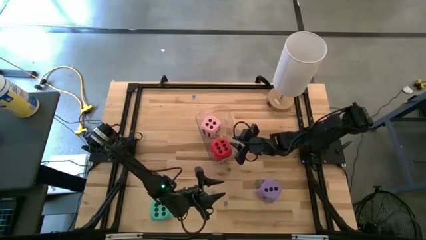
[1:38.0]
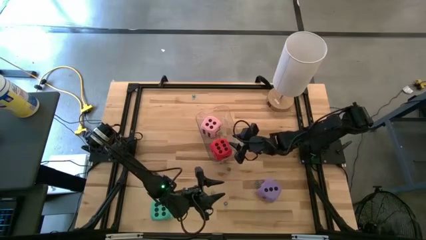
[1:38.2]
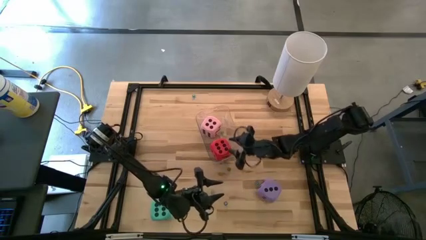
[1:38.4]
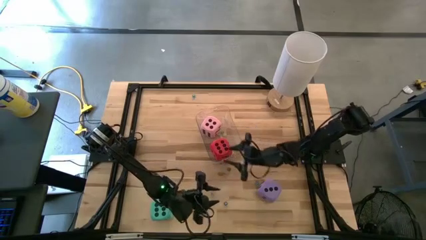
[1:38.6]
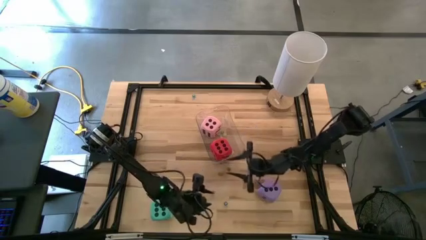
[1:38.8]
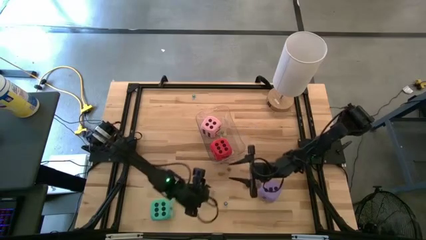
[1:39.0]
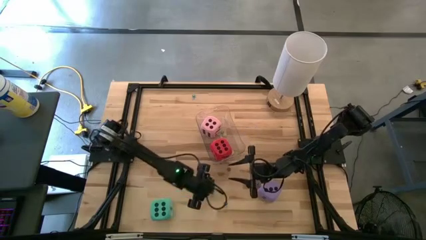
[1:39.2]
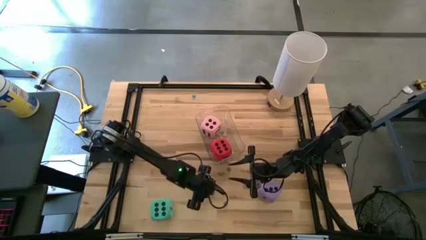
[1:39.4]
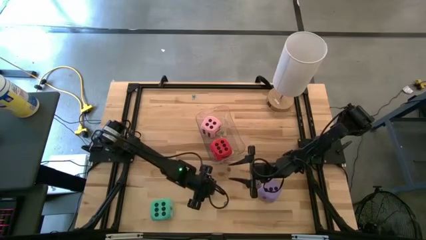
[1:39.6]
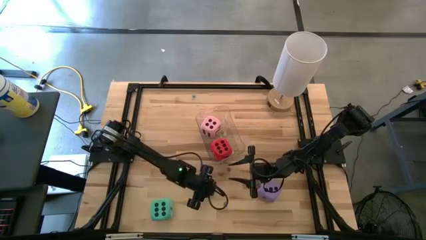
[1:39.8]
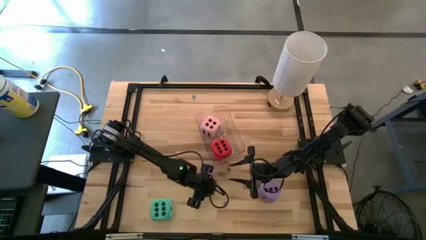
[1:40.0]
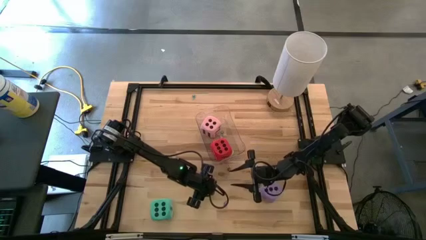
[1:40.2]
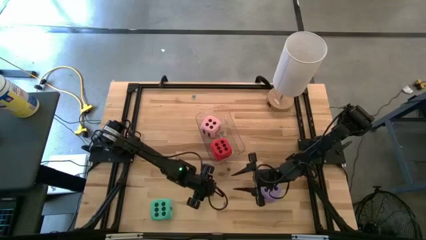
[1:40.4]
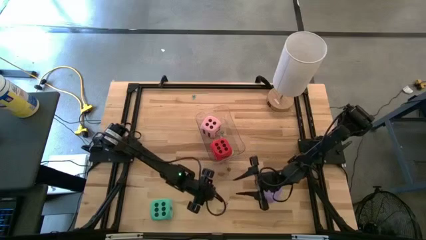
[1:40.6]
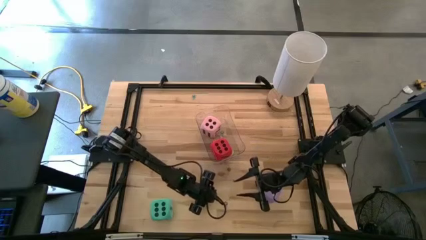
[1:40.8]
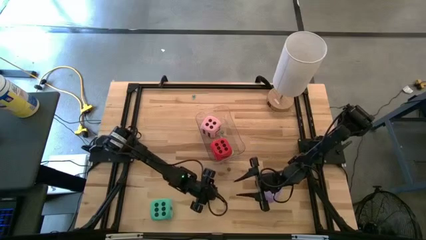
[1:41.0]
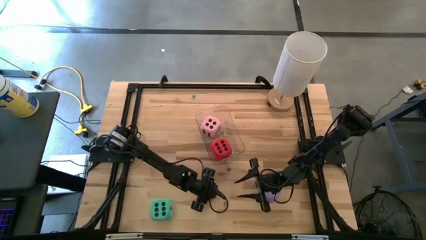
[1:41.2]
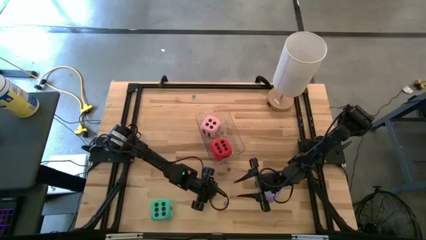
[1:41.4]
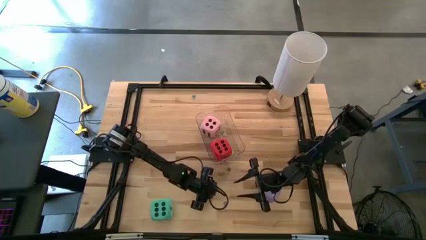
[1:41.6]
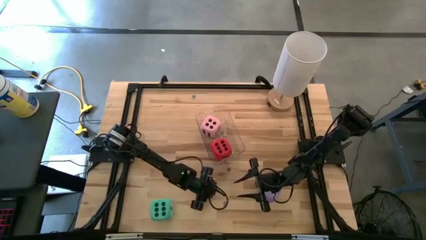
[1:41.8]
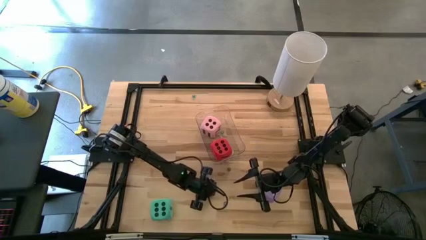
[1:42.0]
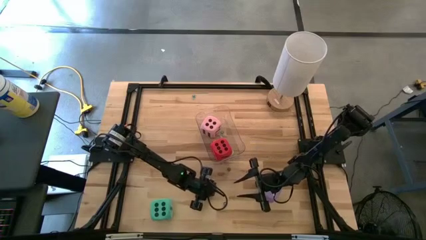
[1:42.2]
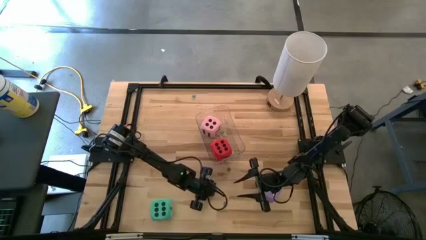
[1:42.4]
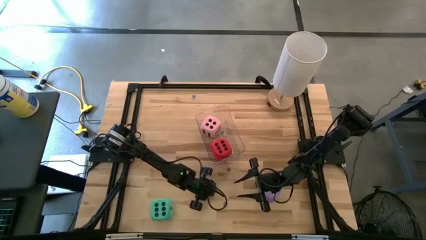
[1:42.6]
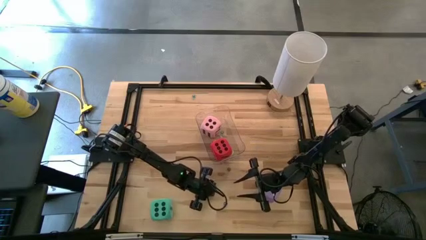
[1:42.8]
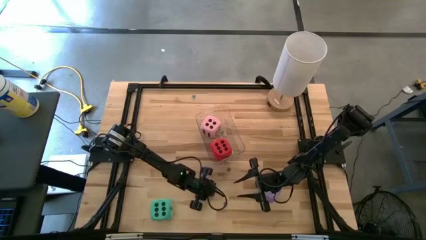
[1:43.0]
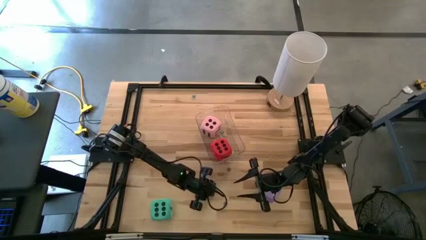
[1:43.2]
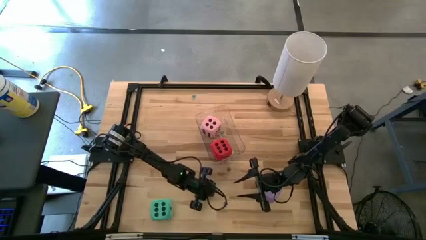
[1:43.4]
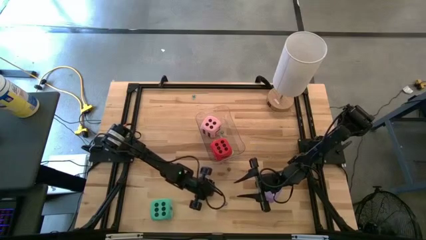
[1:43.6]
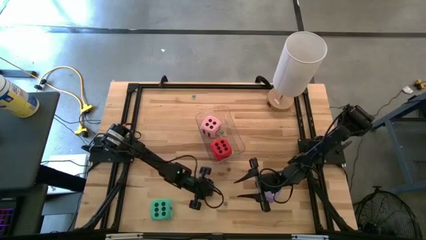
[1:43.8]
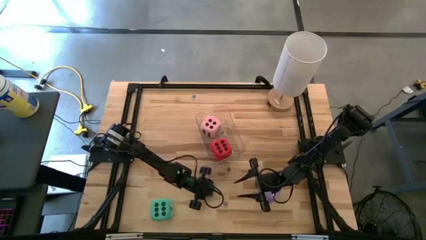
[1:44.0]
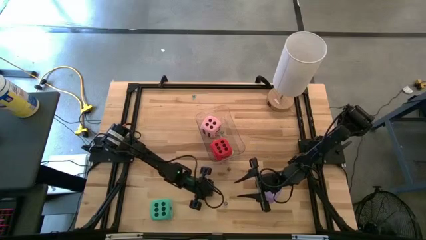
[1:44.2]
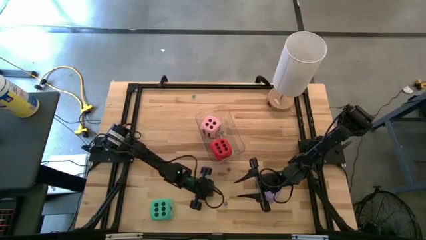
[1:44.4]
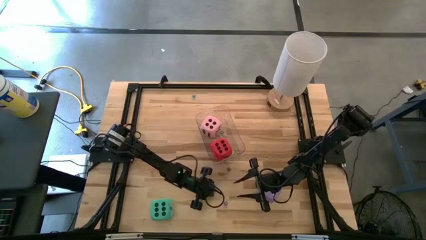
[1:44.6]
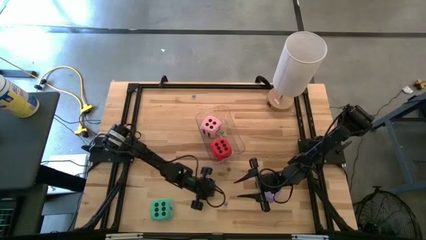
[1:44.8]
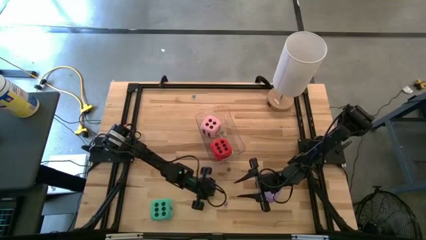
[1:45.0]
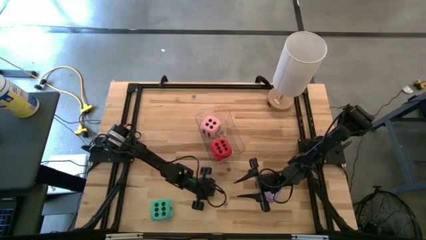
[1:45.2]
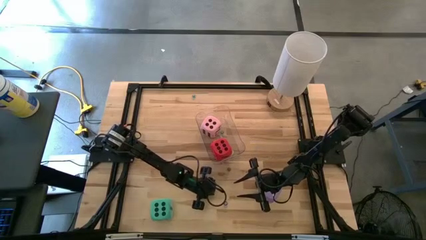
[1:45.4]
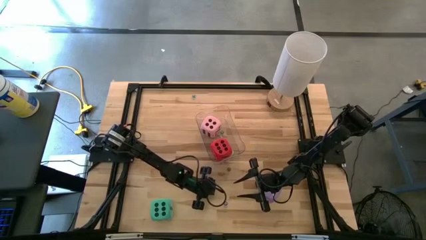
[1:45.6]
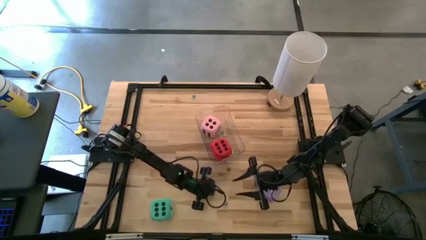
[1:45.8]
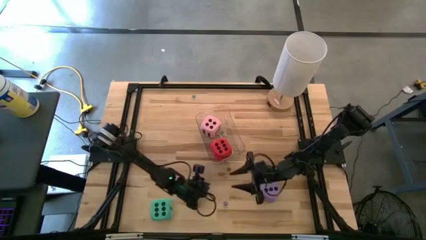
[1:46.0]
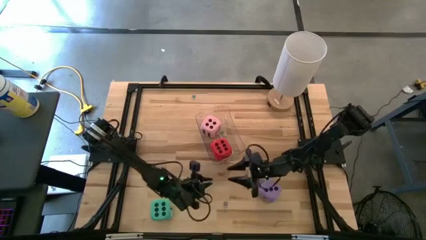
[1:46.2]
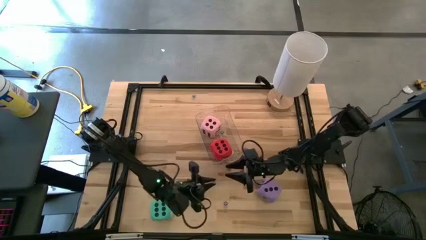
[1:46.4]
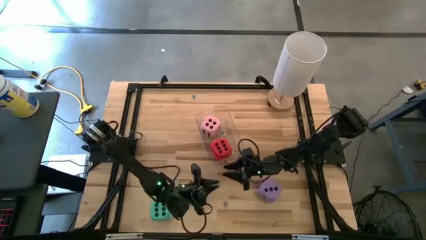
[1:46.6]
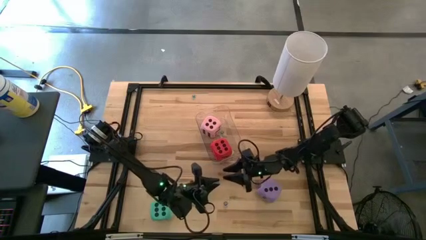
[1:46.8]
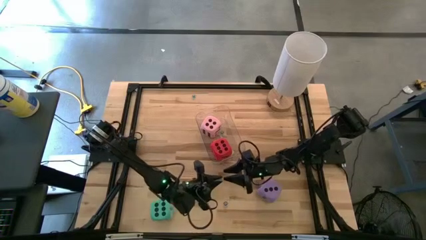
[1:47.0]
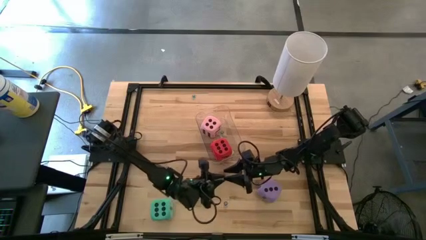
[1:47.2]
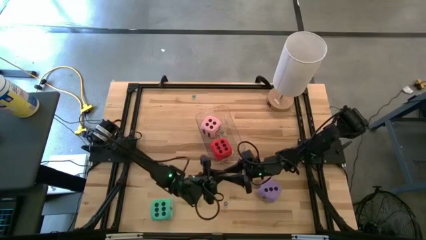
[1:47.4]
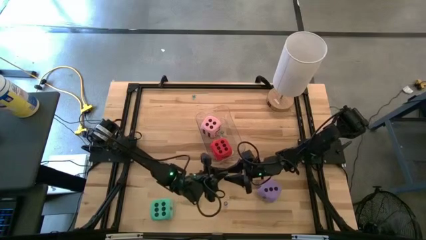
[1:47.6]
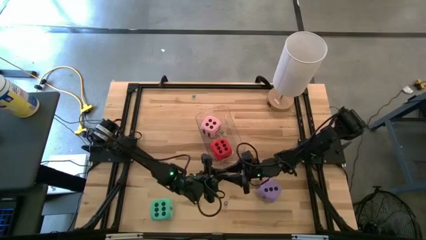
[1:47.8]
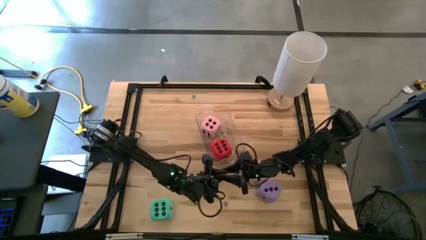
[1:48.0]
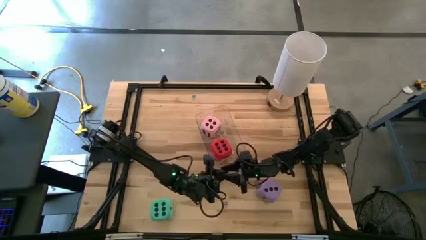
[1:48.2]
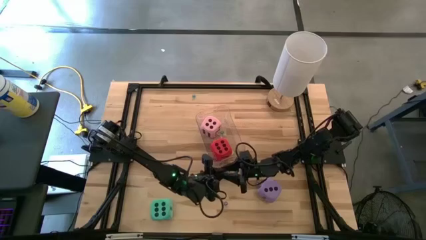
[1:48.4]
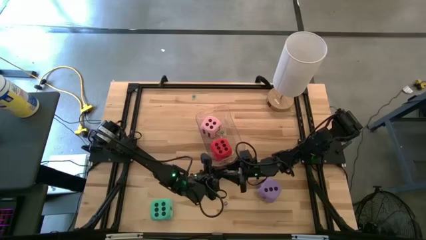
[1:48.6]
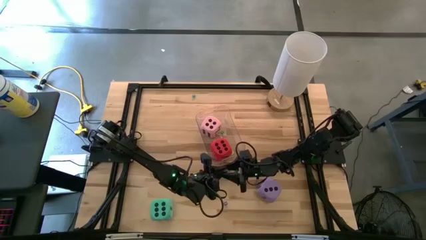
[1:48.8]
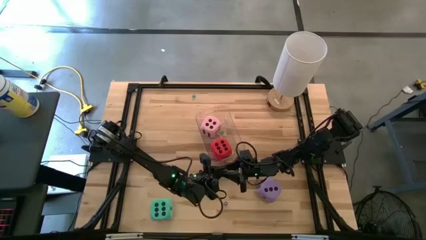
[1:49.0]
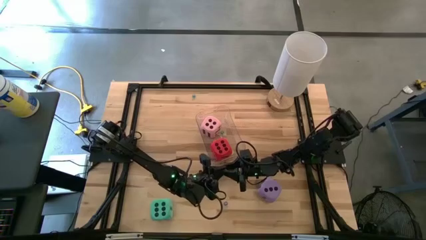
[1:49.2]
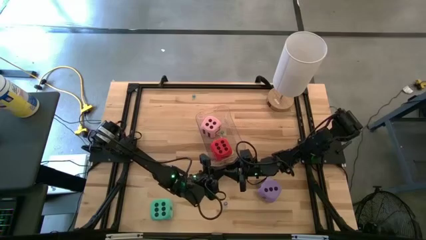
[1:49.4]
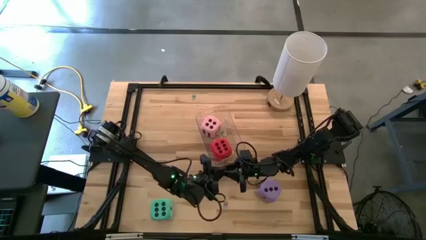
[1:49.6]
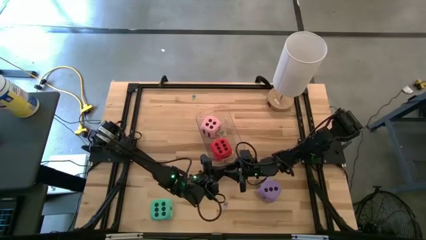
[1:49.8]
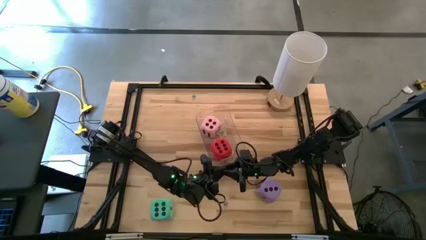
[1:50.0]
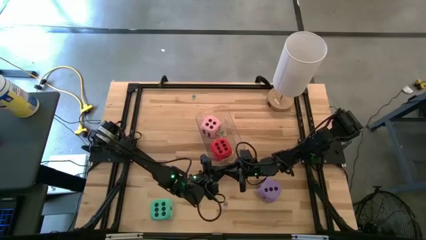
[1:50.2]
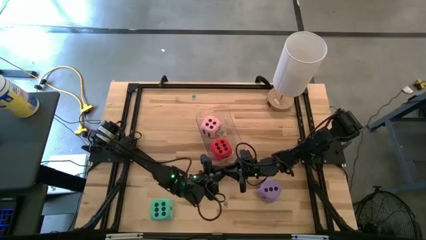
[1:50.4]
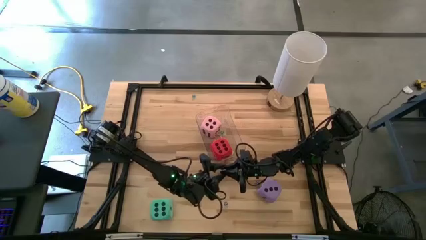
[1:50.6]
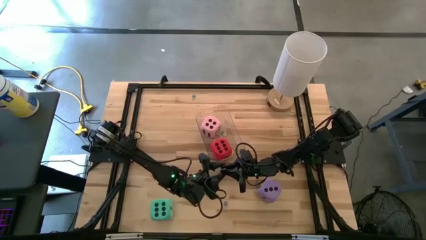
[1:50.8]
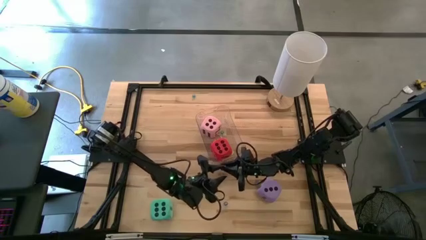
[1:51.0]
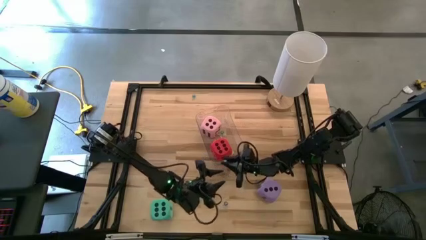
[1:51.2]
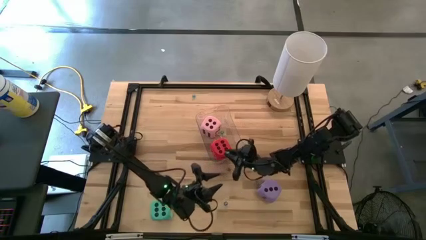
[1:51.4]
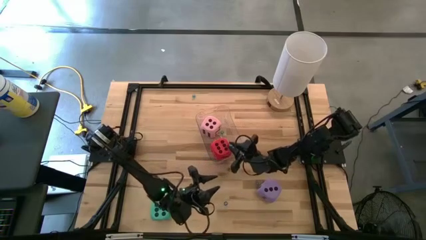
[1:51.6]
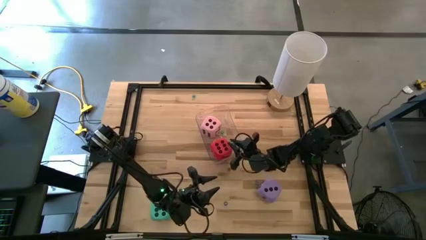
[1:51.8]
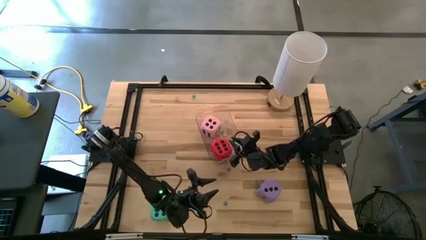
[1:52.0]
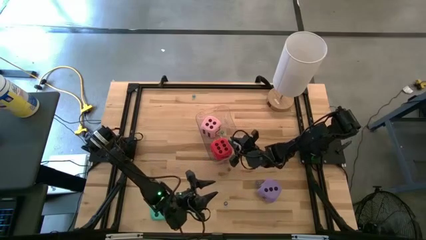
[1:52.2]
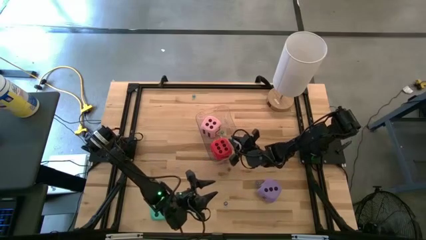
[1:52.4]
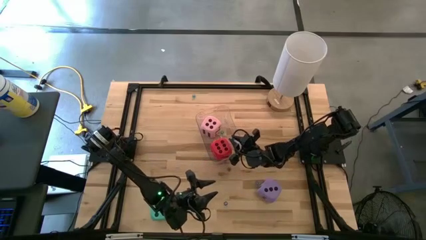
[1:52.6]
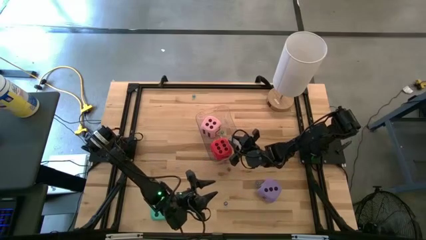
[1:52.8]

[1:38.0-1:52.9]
Task: Pick & Place Dice
Put the small blue dice into the transparent bin

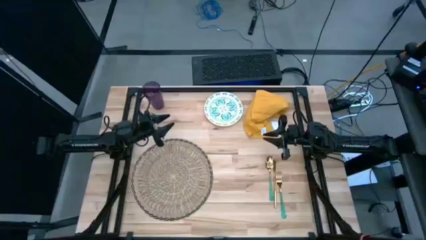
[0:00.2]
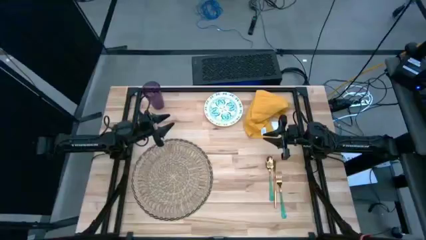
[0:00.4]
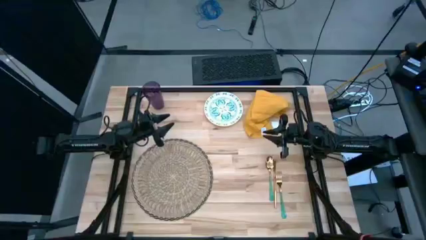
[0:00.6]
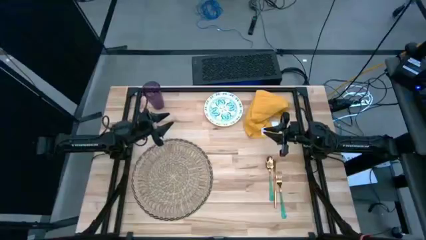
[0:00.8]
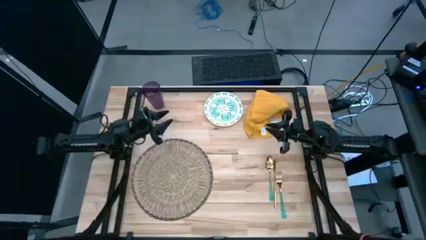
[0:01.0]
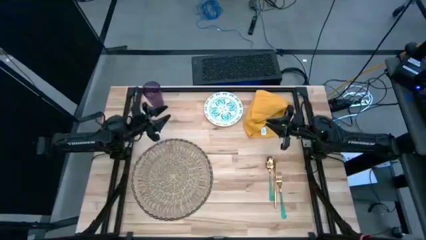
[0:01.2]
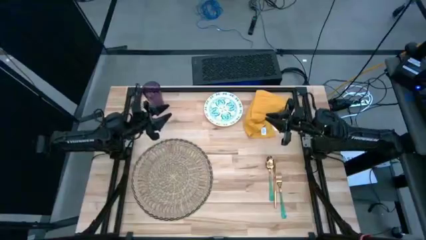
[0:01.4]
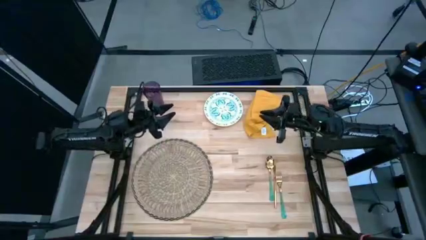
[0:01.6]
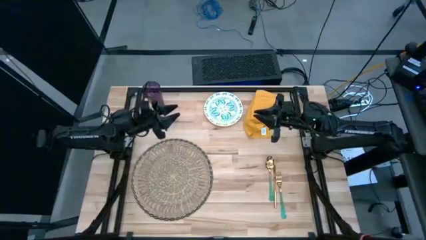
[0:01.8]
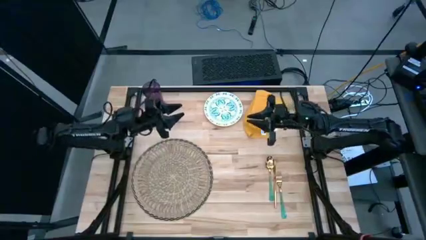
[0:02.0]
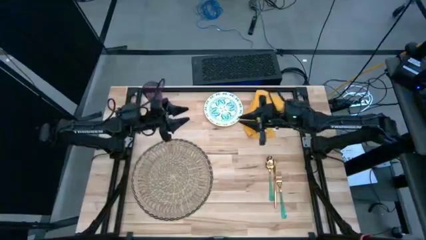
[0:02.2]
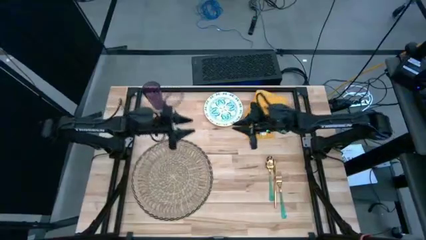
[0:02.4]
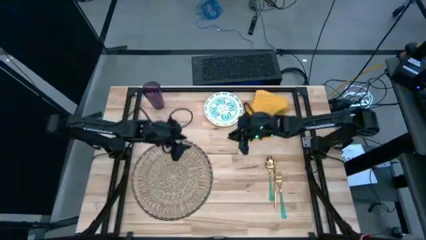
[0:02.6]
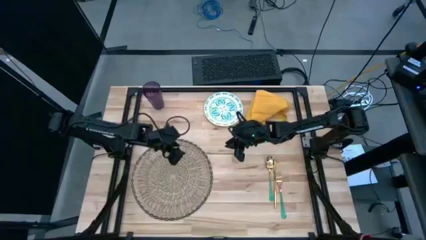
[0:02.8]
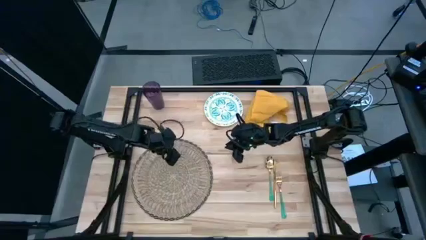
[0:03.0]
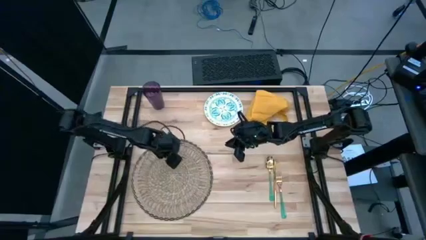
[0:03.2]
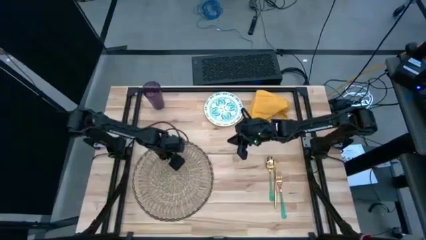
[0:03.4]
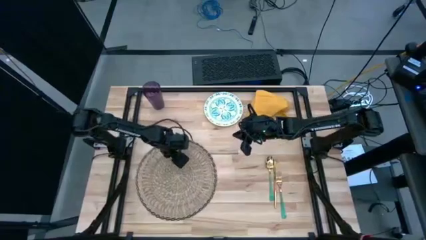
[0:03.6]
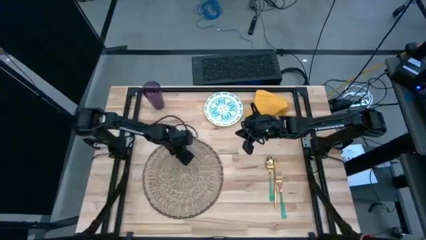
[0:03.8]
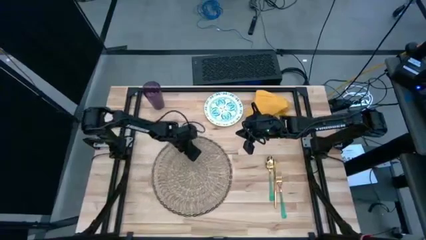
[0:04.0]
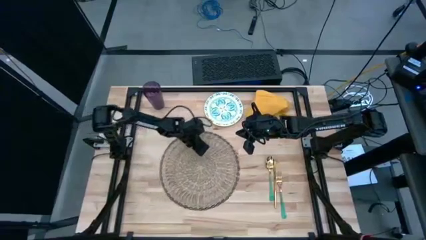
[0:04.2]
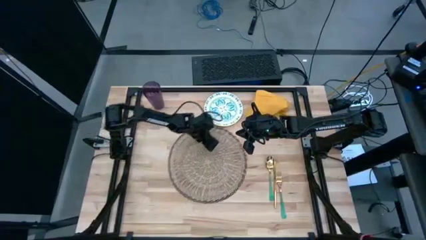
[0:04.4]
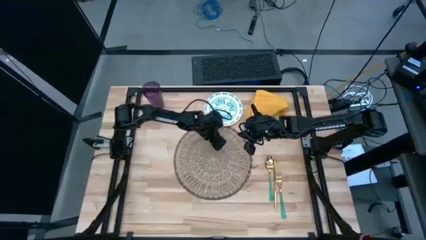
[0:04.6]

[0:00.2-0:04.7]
Task: Set table place
Move the tablemat to the center
